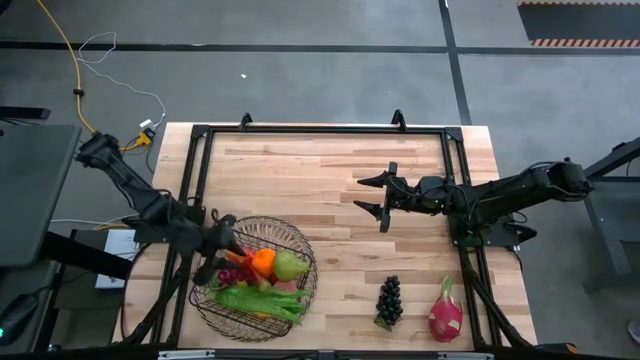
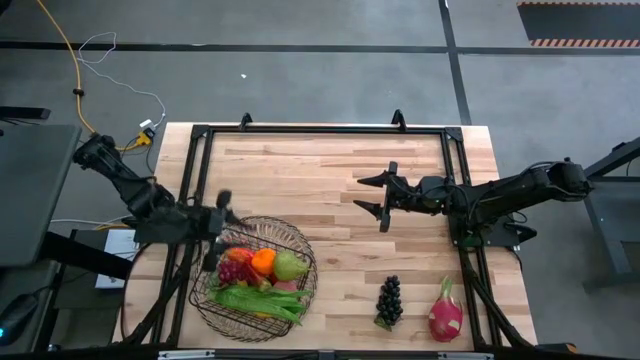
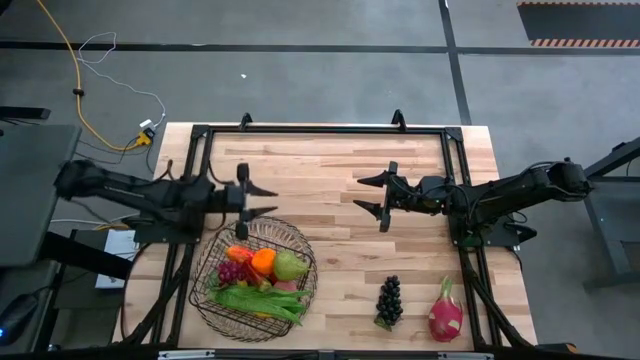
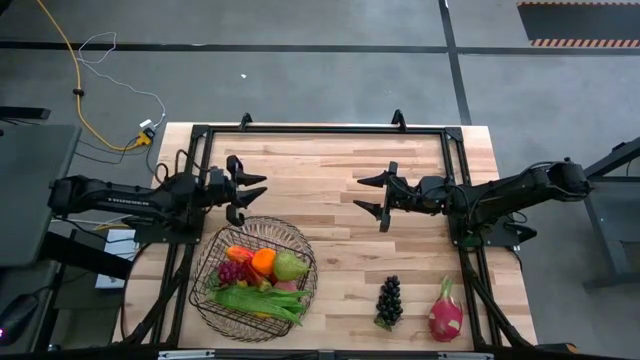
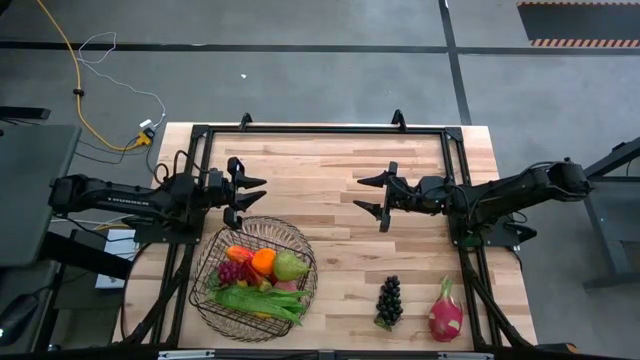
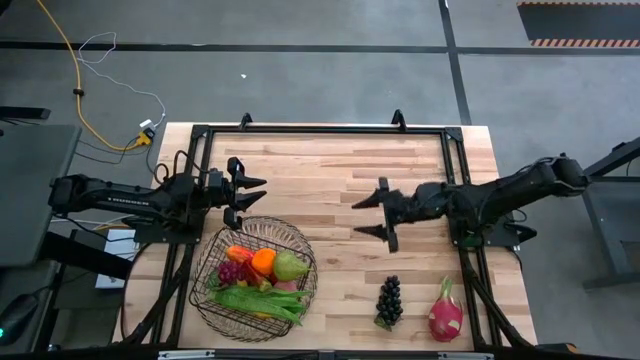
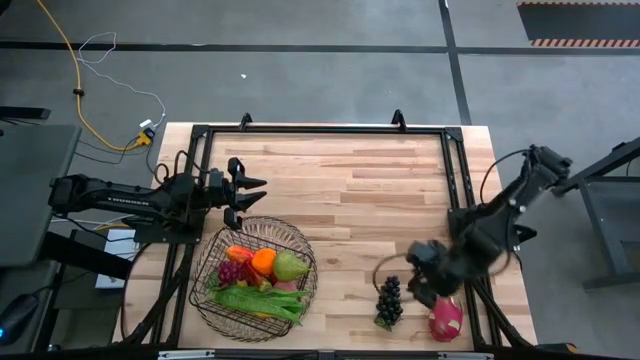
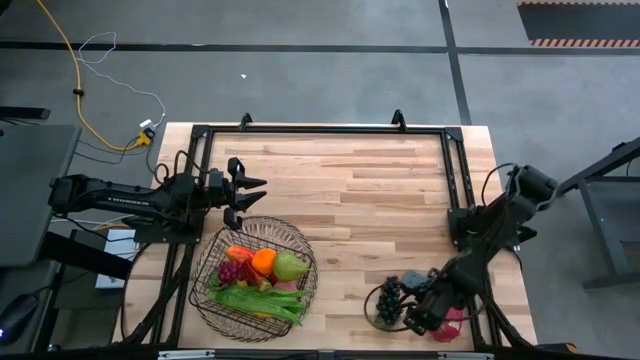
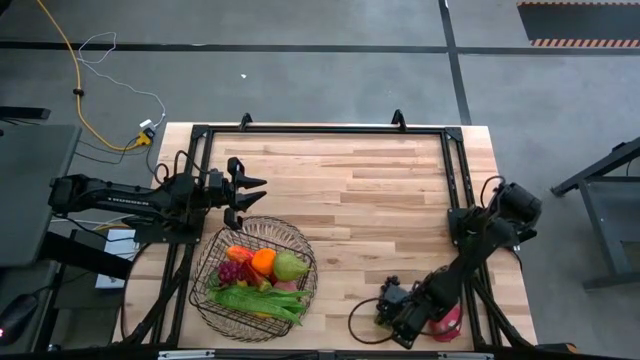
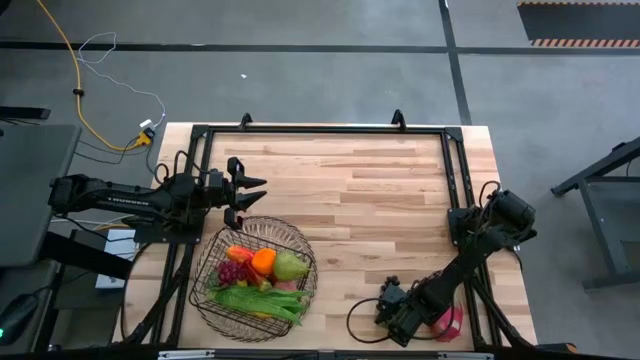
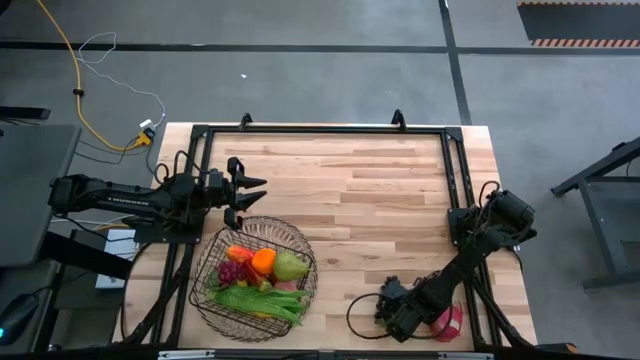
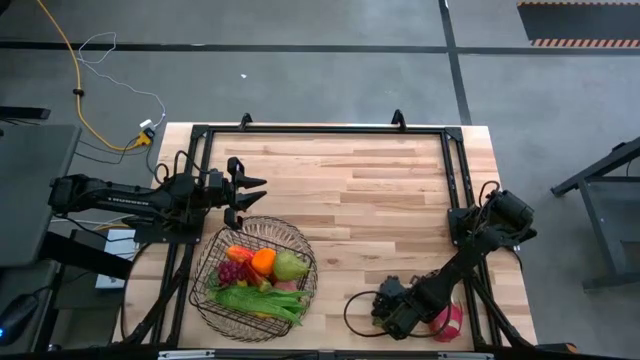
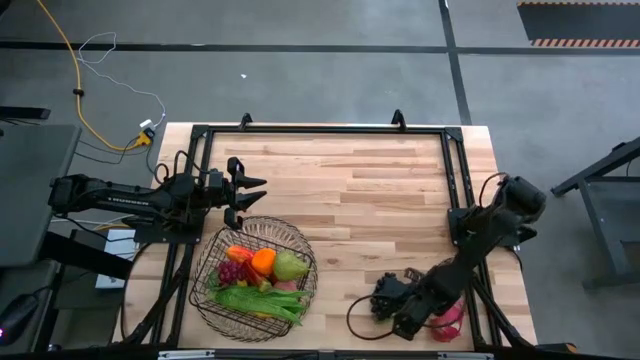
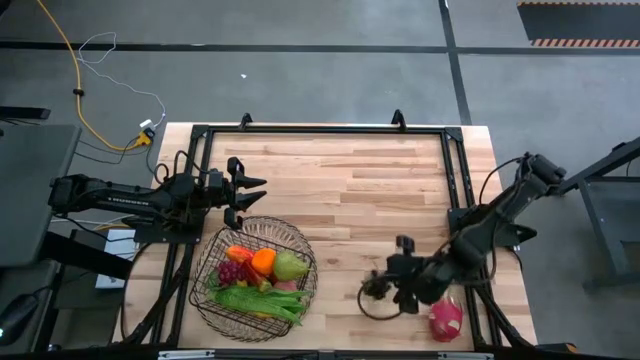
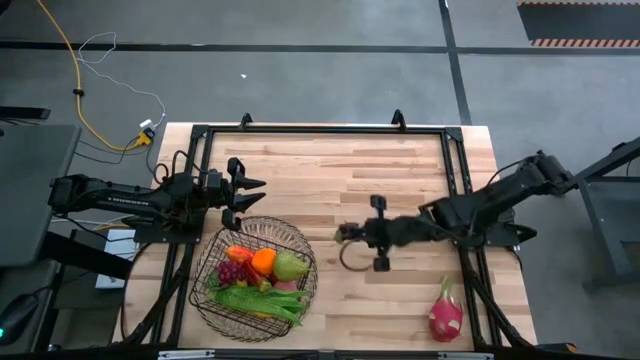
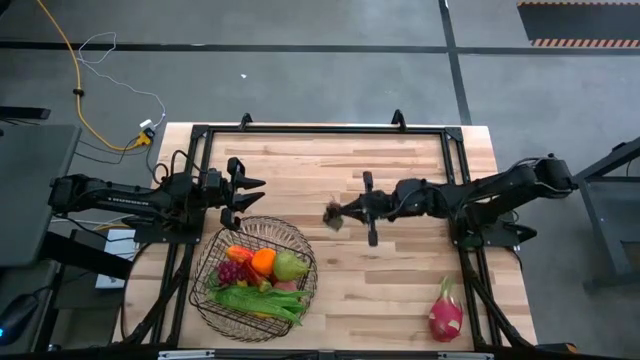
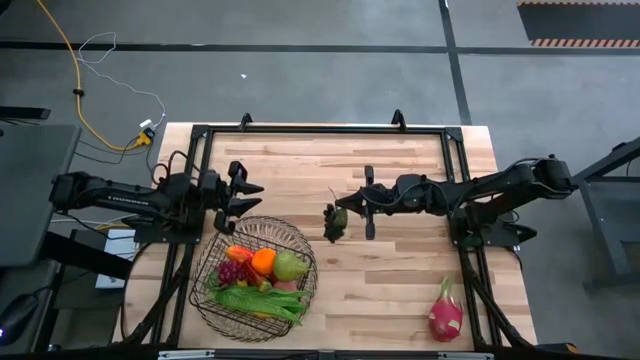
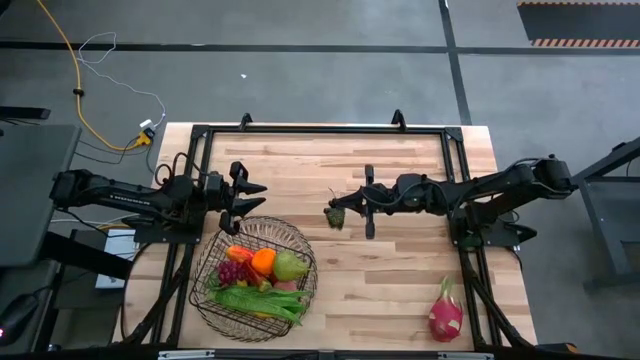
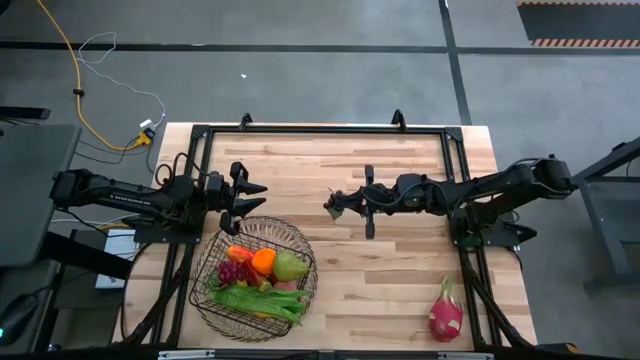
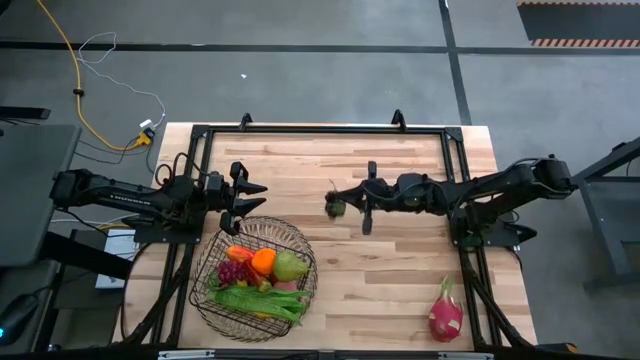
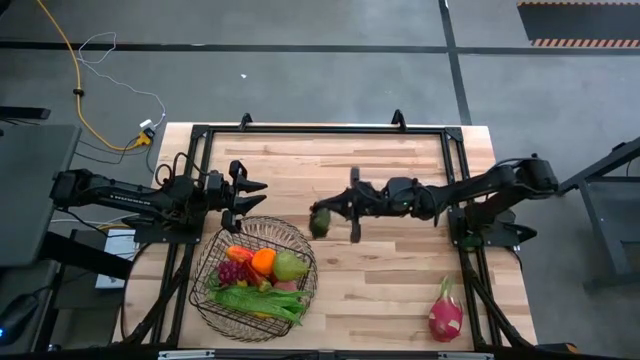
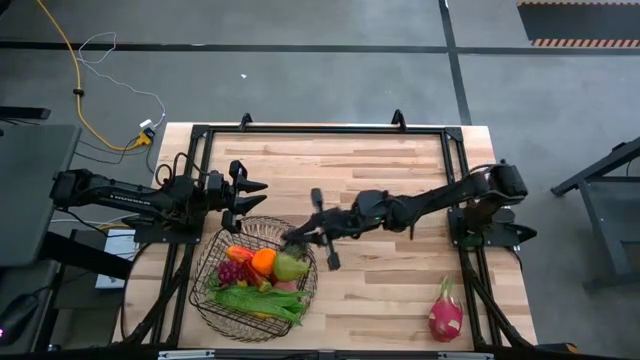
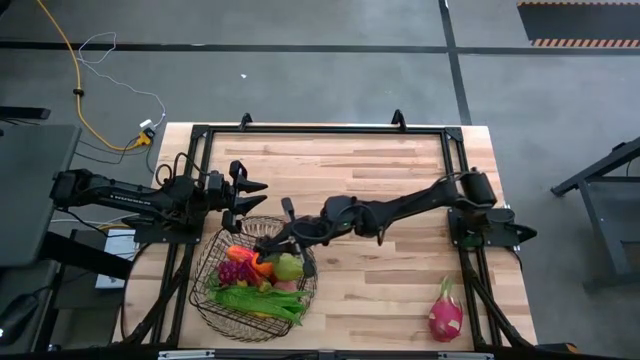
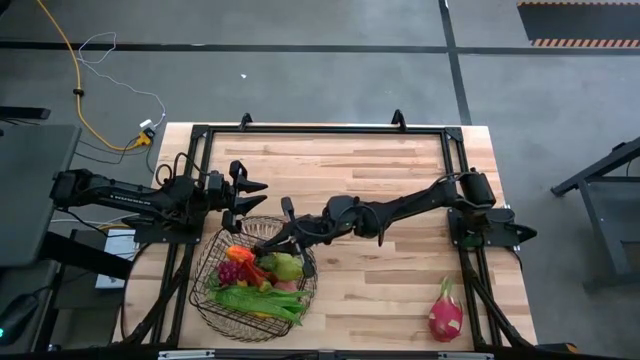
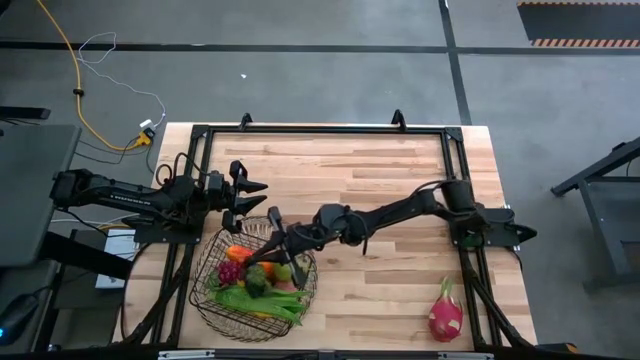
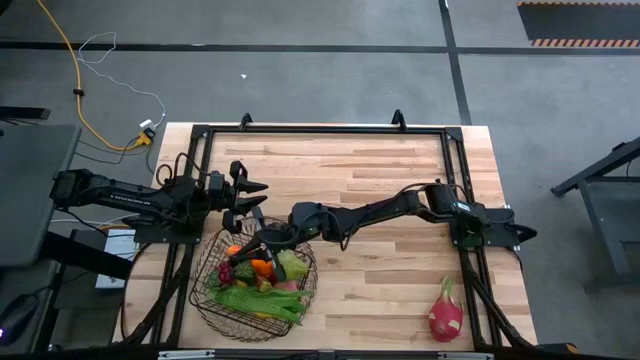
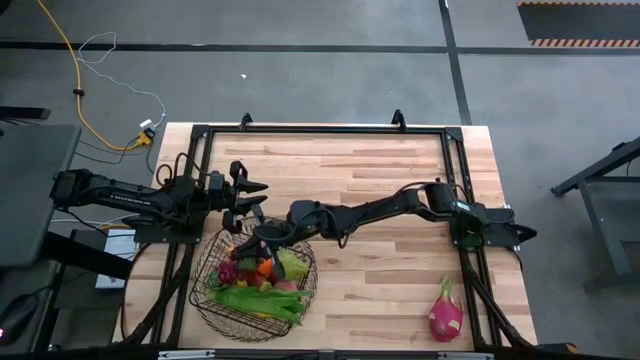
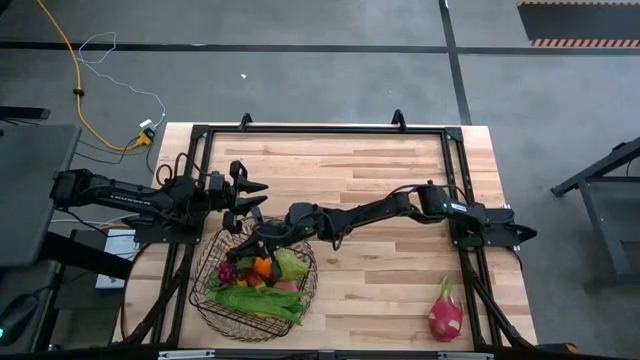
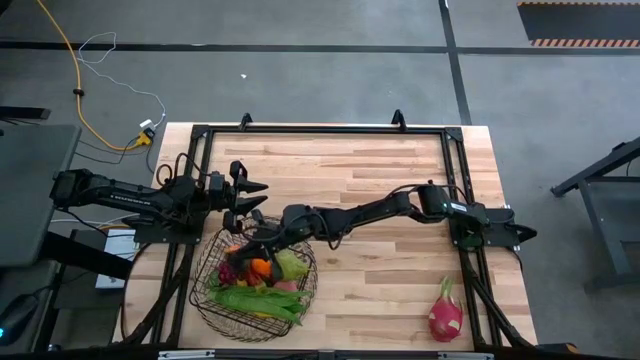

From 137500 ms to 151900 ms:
Task: Build produce basket
Put the purple grapes into the black wire basket

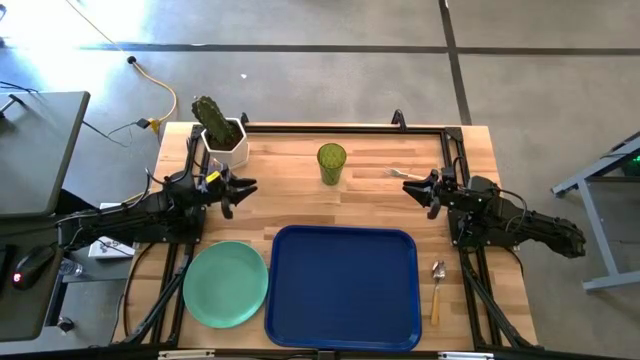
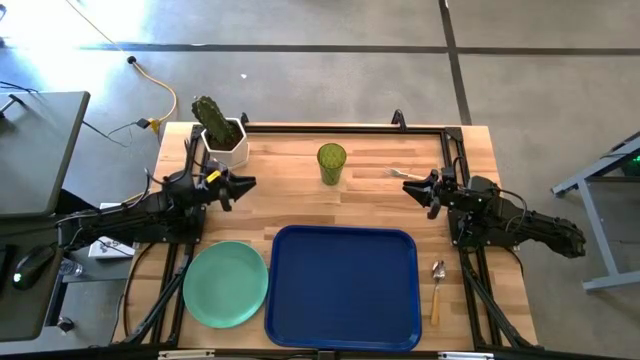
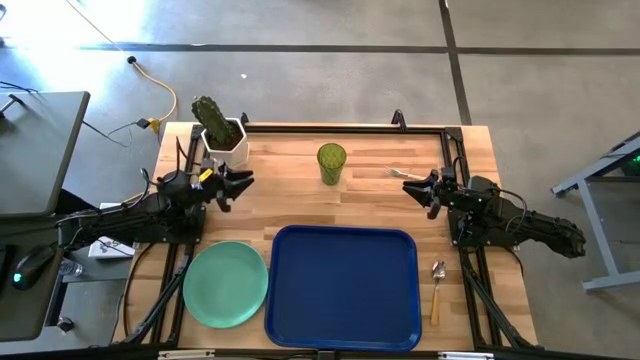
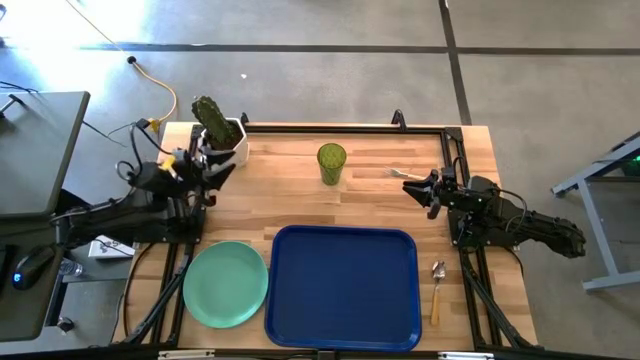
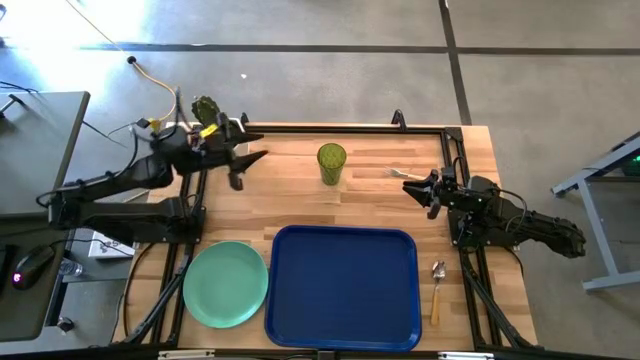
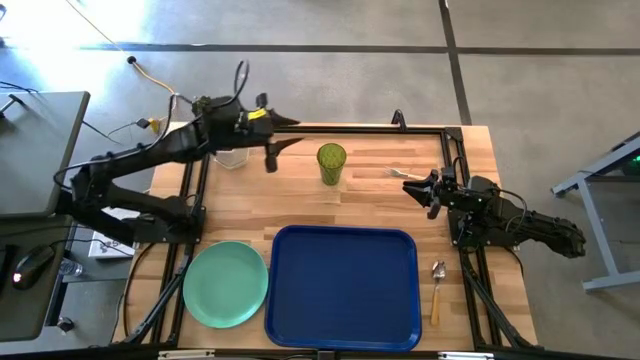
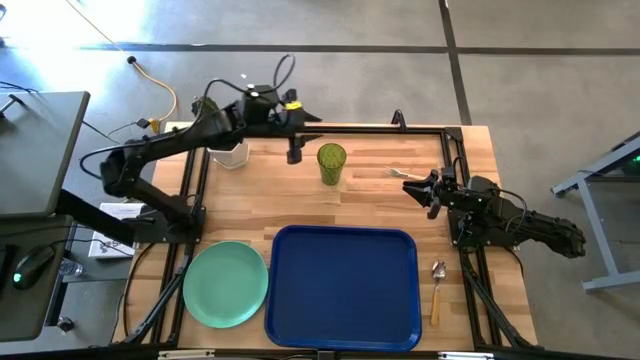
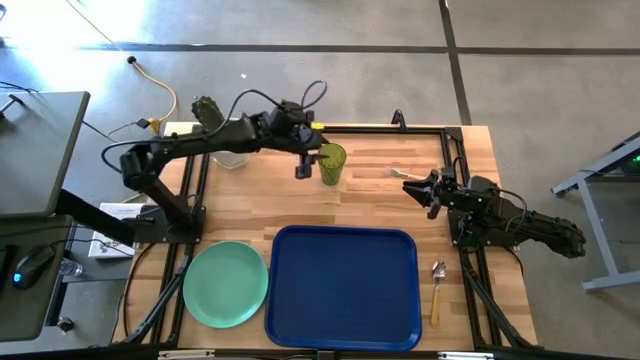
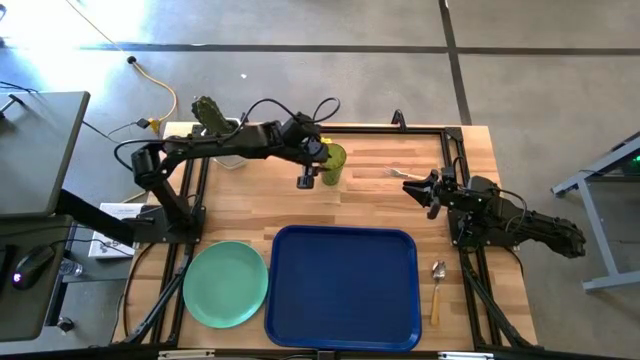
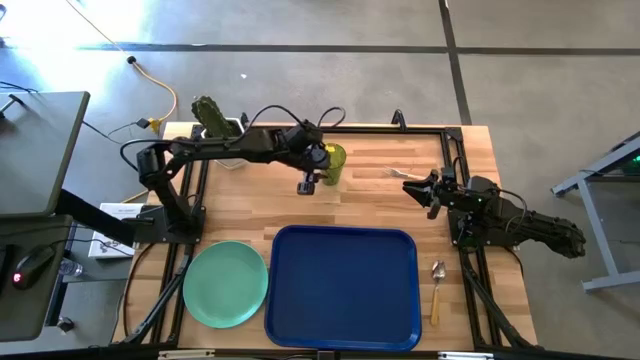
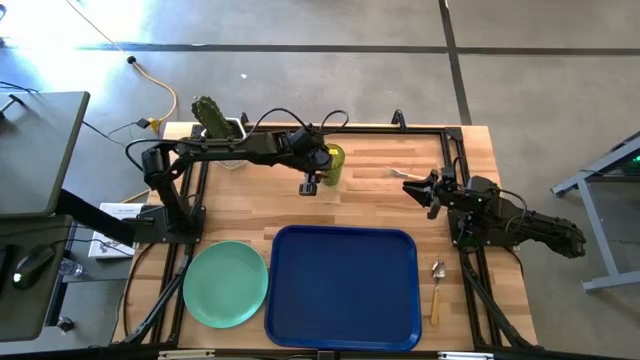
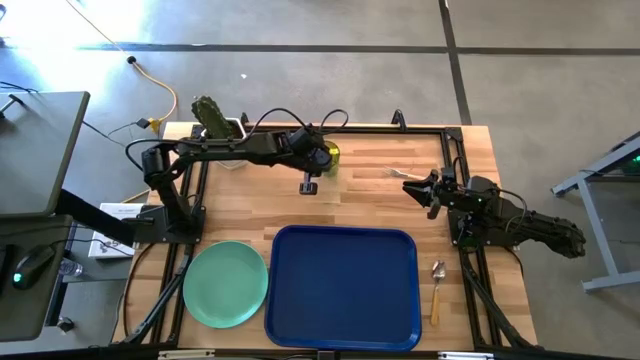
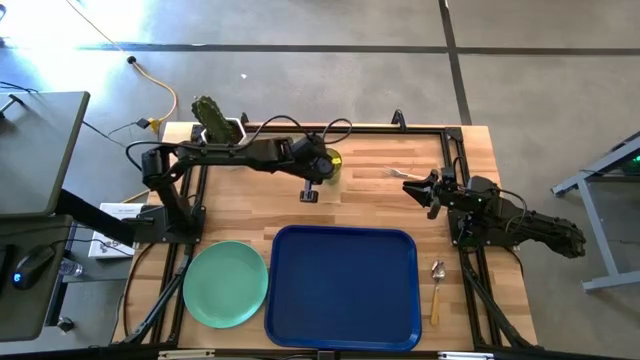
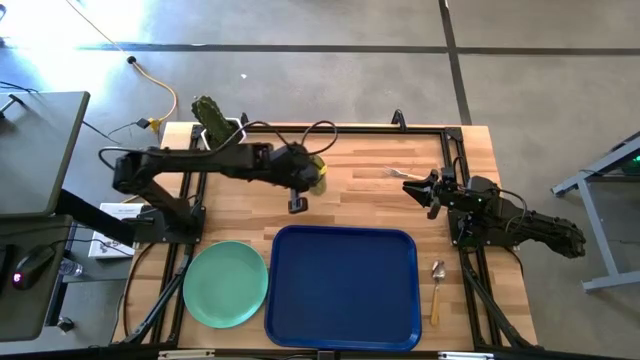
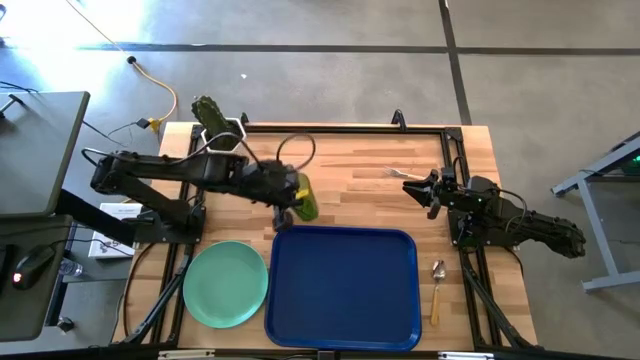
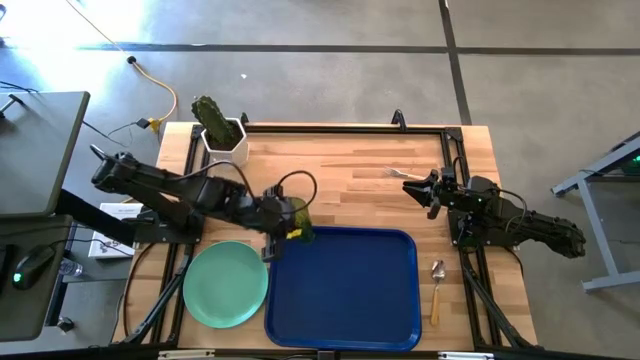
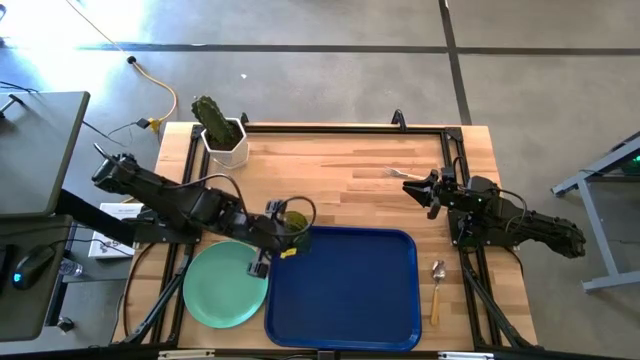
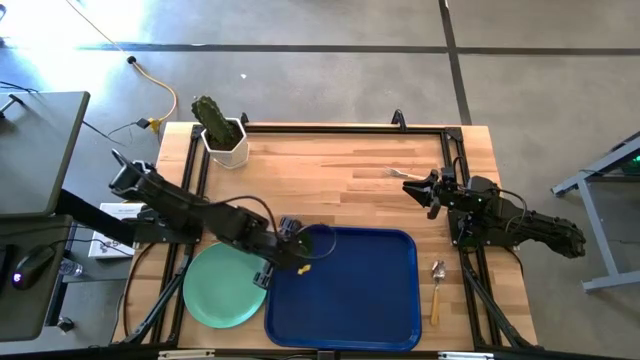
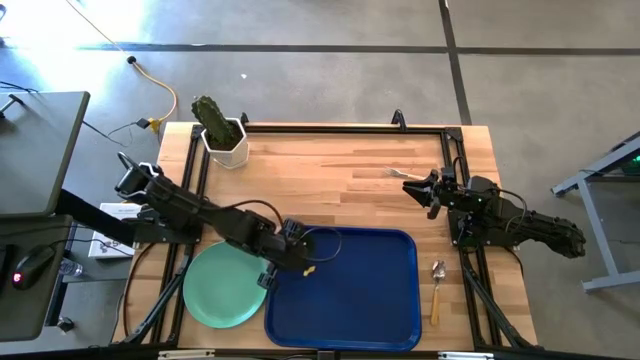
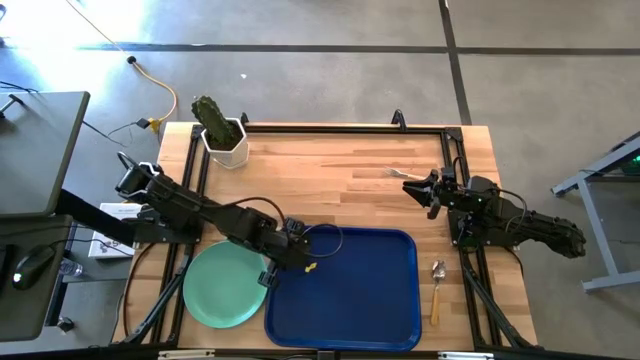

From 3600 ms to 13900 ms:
Task: Pick and place plate/cup/fork/spoon on tray
Put the green glass on the blue tray
